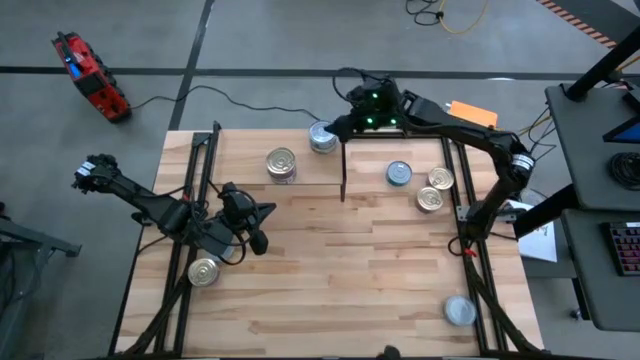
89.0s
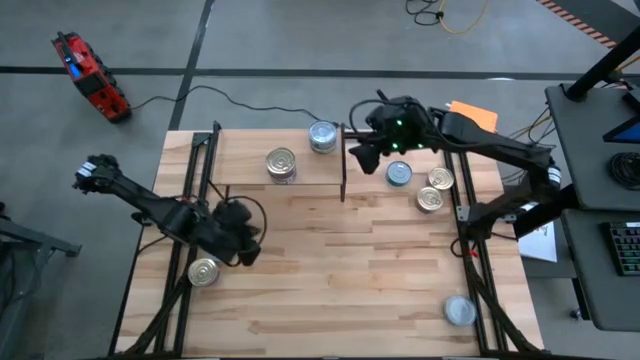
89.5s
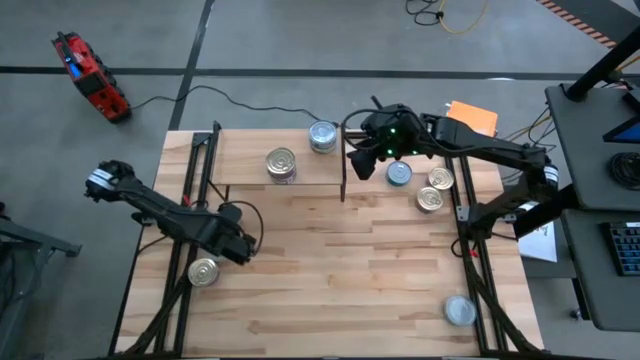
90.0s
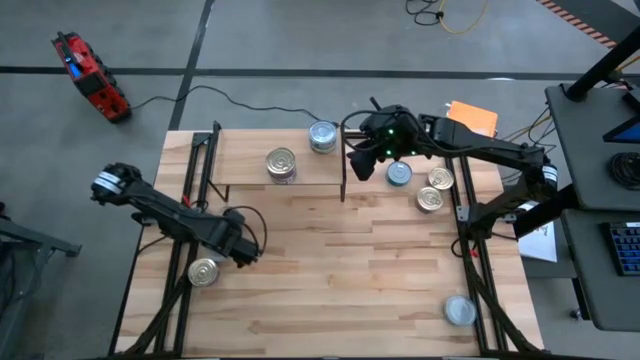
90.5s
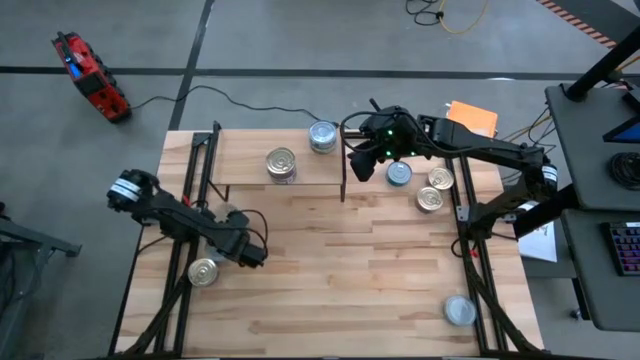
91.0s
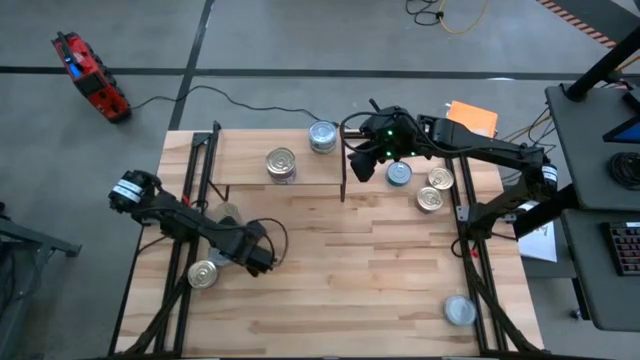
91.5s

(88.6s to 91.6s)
Task: Stack canned seafood by type on shelf
Move the blue and pink tuna can to the center of the table

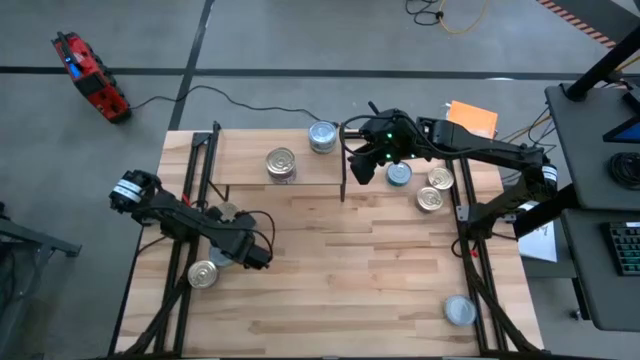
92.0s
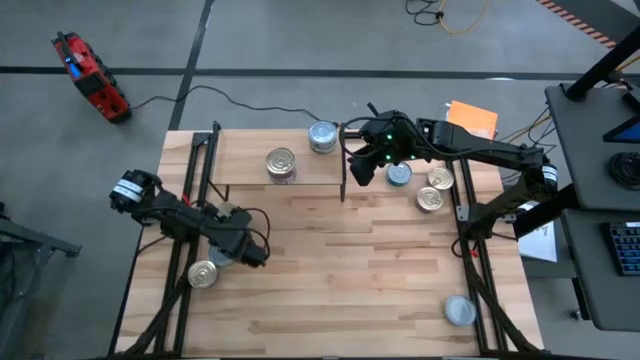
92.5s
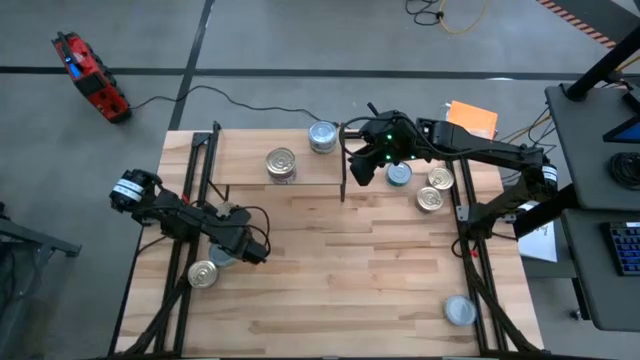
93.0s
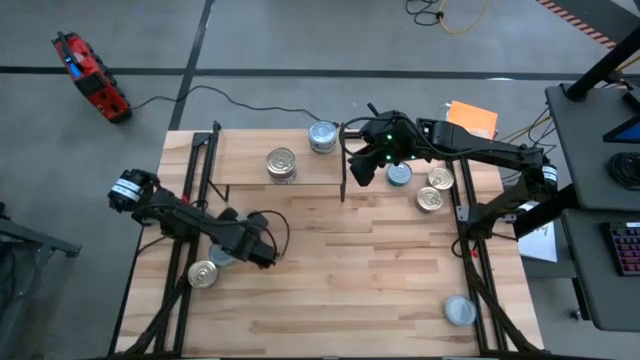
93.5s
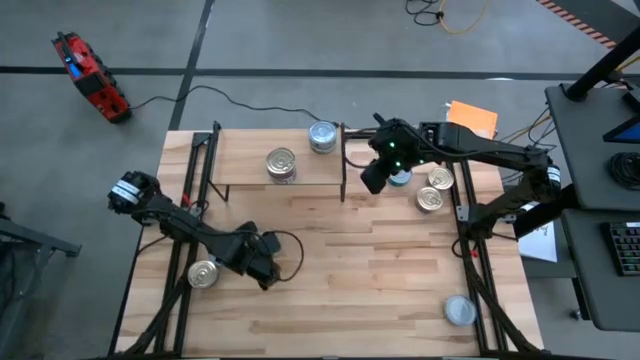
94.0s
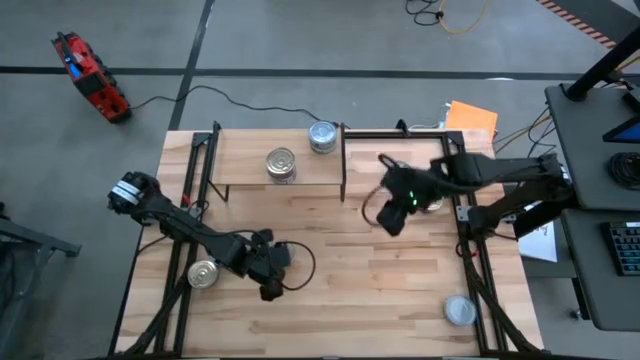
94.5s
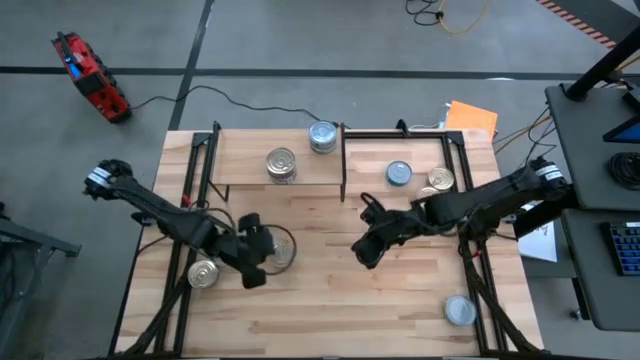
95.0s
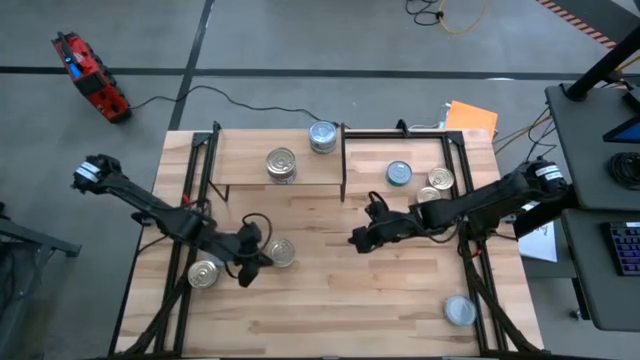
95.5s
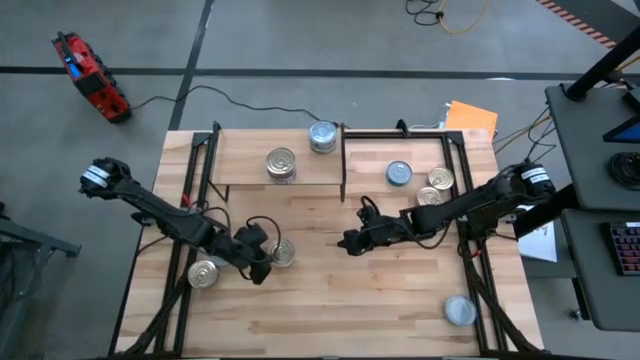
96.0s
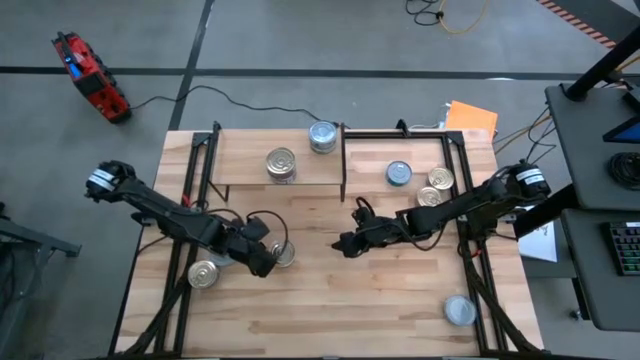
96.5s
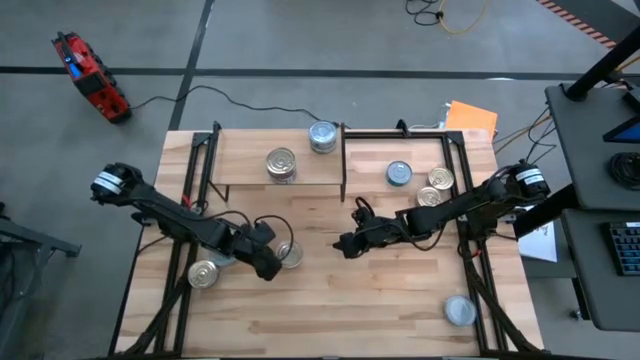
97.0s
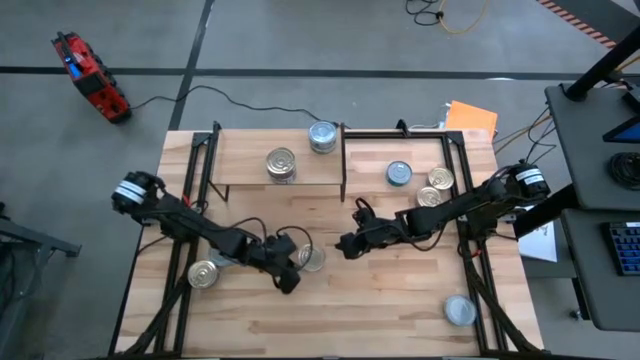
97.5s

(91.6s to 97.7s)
Move the blue and pink tuna can to the center of the table

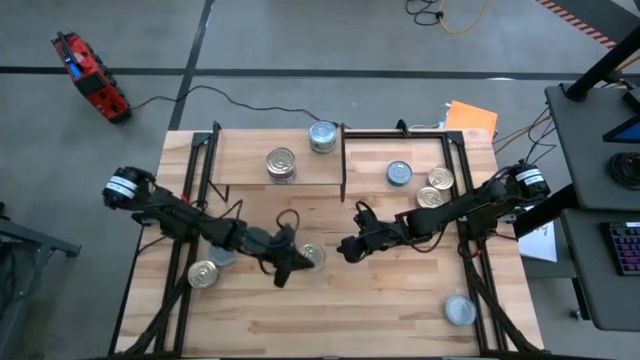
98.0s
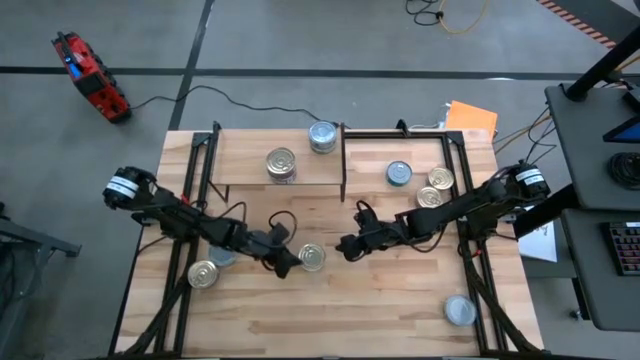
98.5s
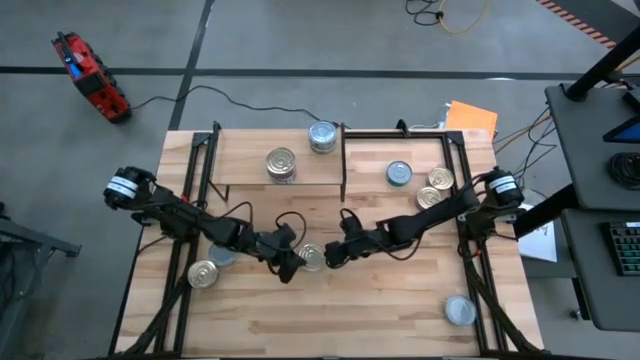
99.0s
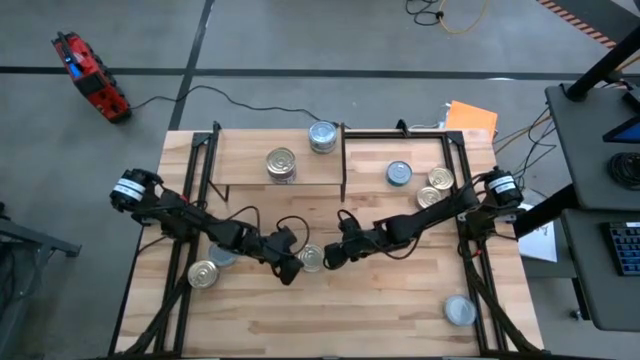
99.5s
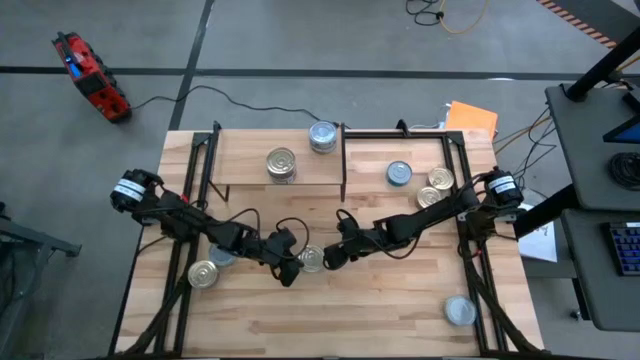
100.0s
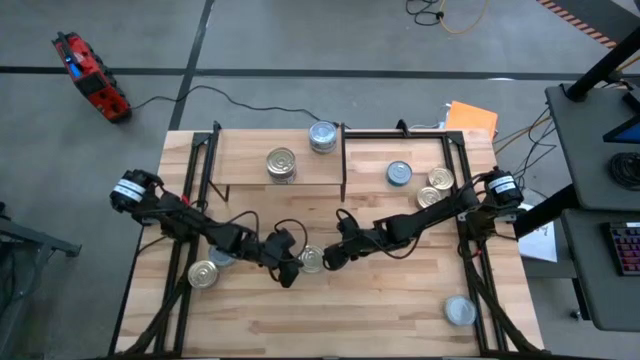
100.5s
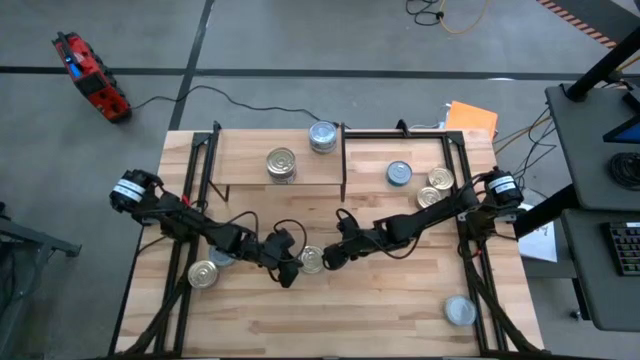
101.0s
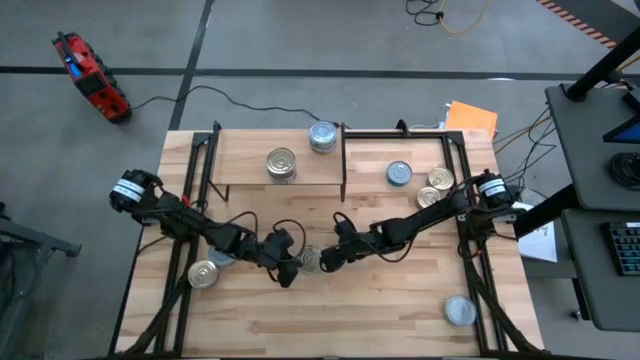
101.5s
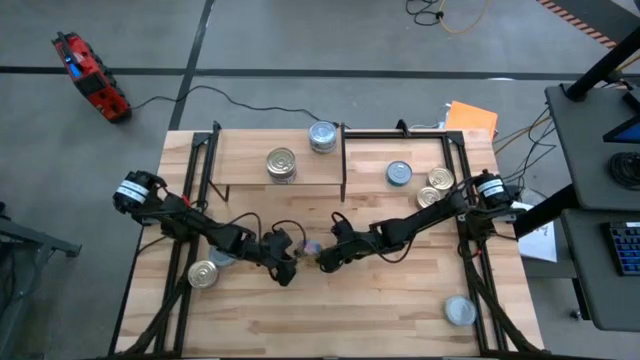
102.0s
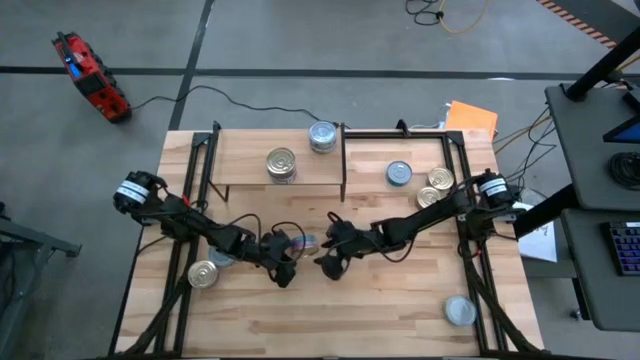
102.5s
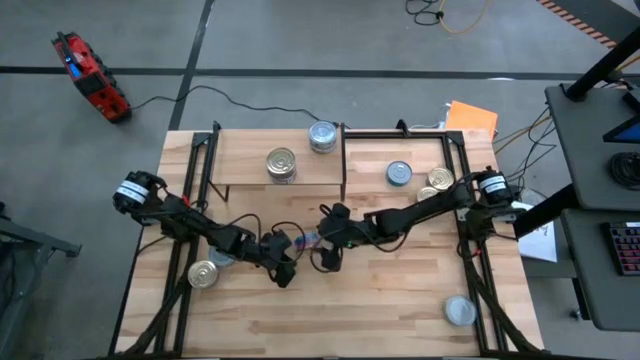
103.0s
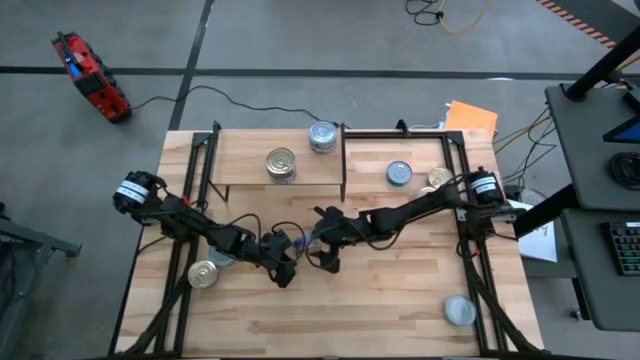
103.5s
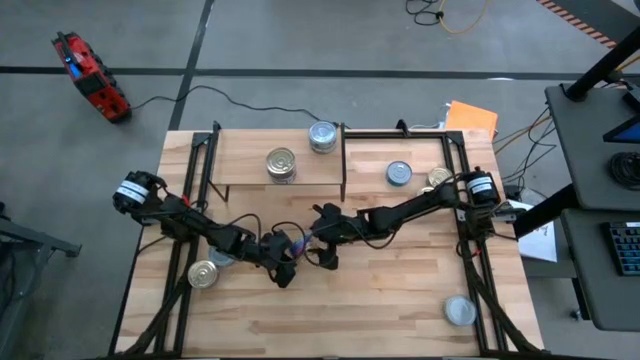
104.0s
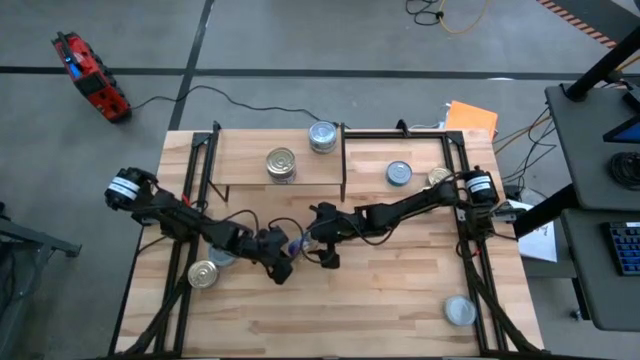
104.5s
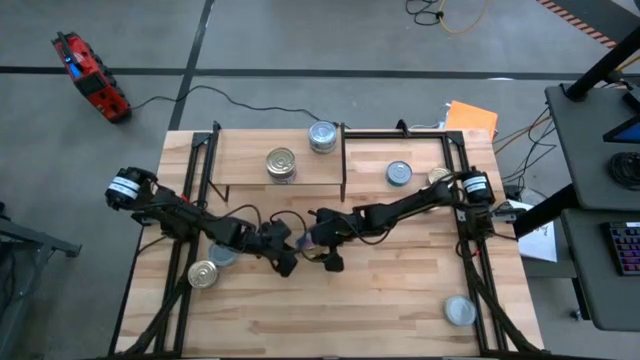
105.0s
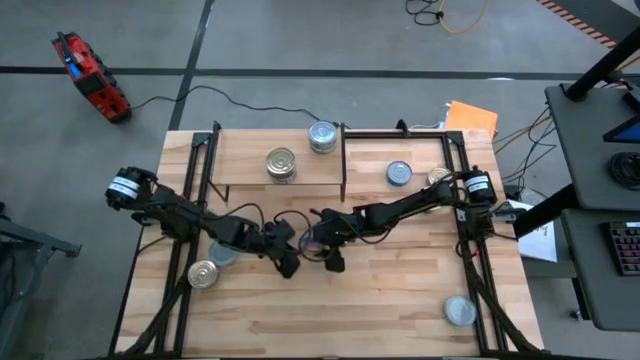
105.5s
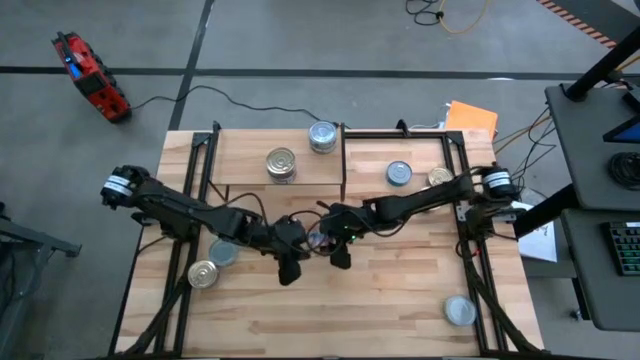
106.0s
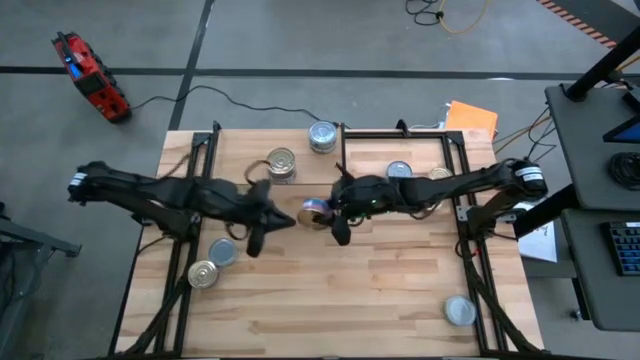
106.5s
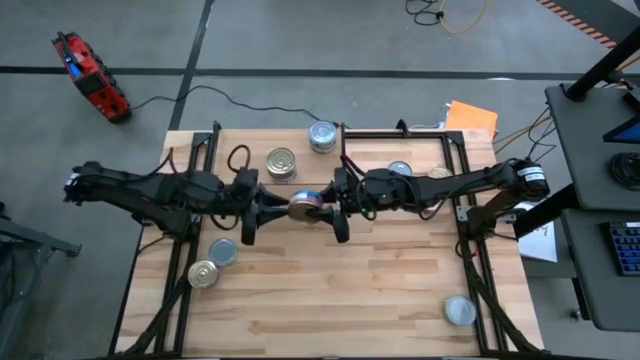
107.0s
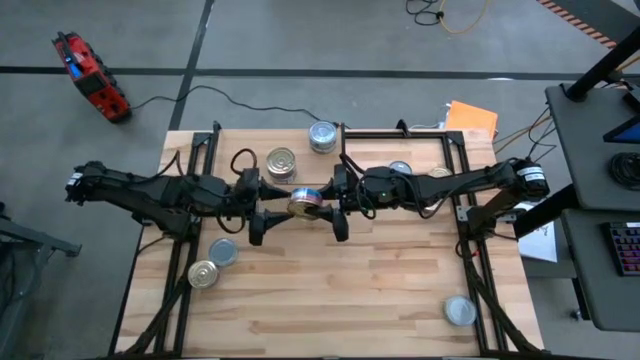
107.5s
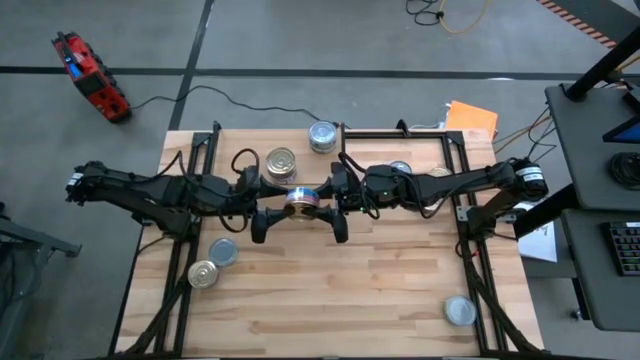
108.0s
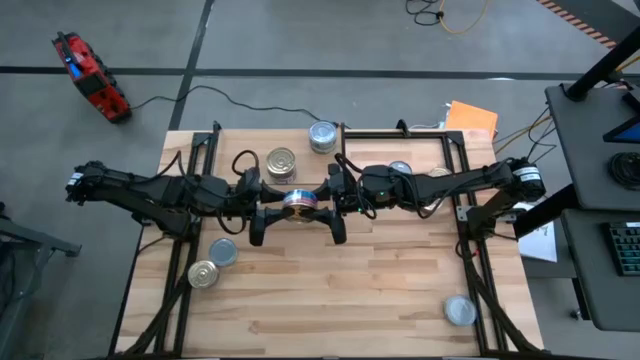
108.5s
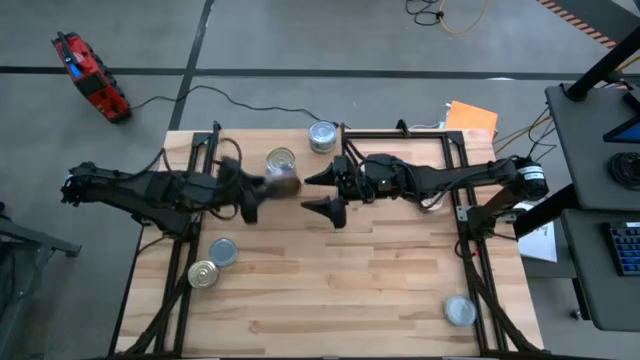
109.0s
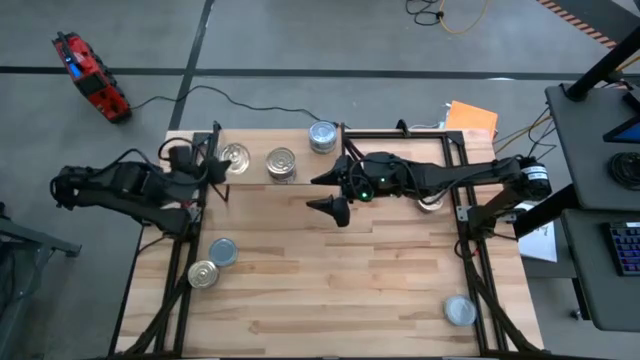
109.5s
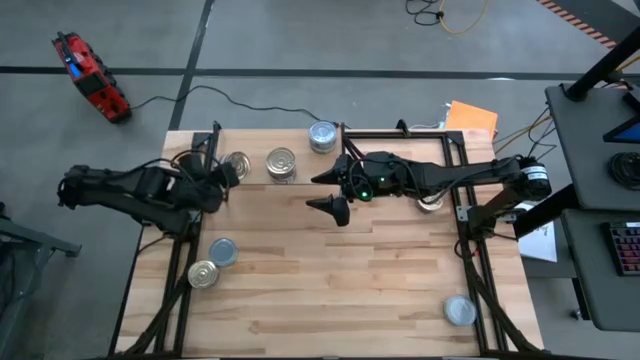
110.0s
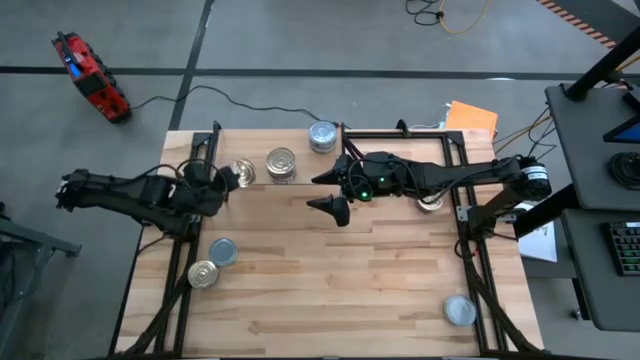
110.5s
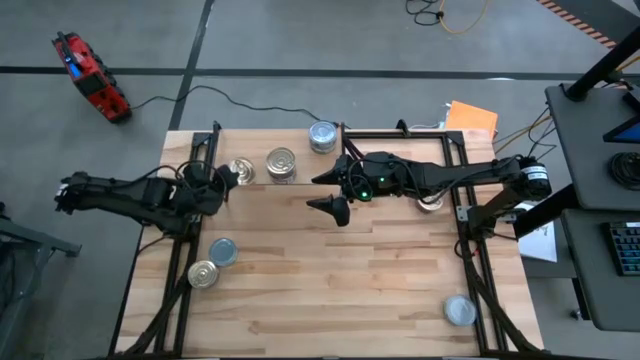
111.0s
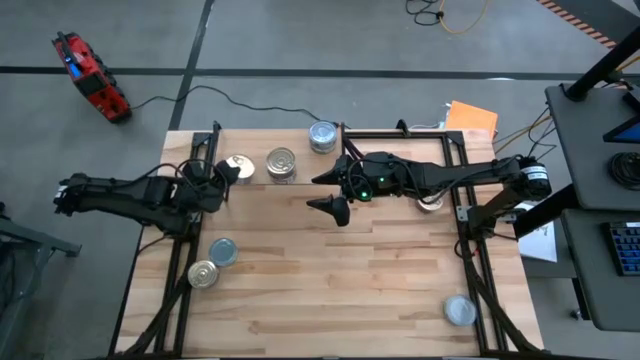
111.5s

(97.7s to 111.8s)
Put the blue and pink tuna can on the shelf
